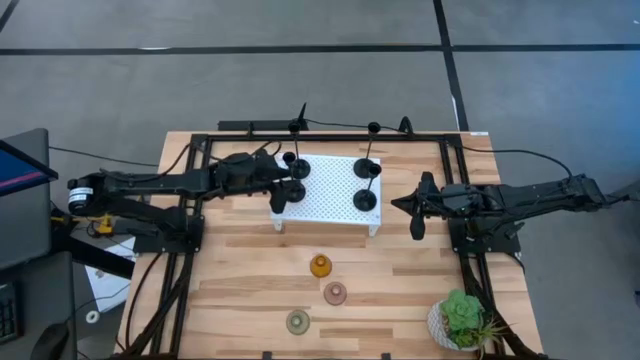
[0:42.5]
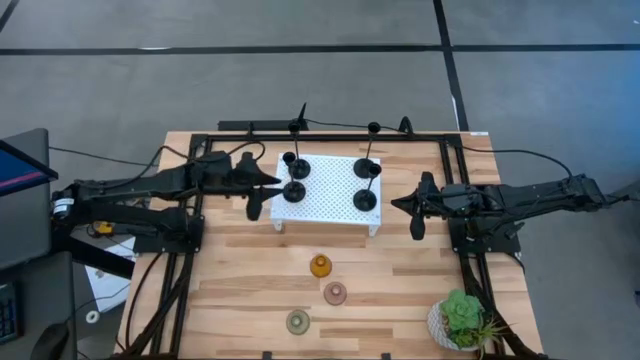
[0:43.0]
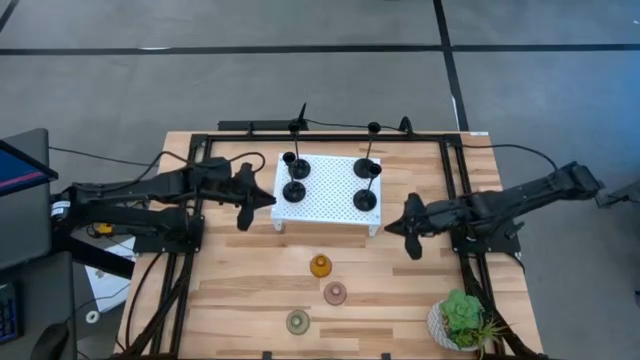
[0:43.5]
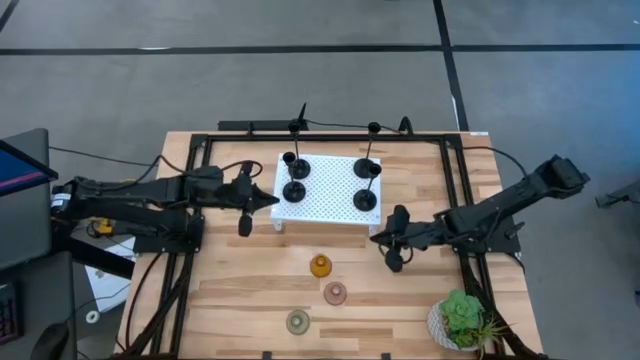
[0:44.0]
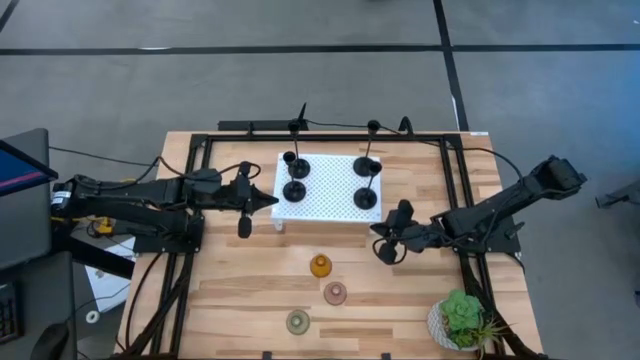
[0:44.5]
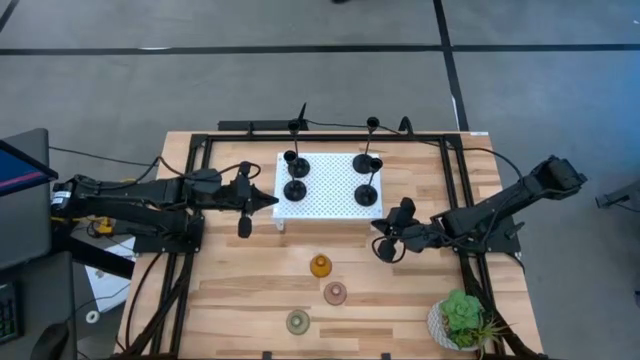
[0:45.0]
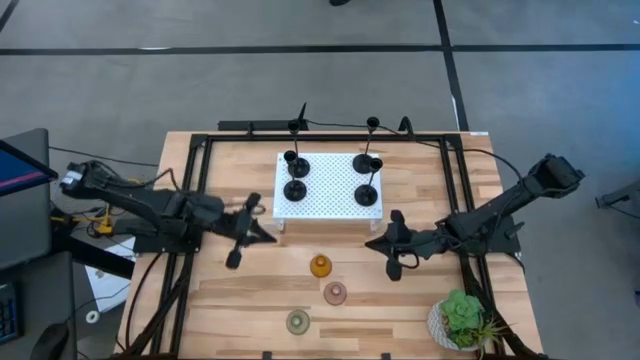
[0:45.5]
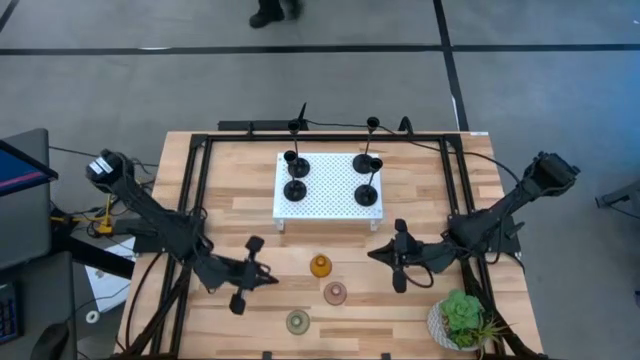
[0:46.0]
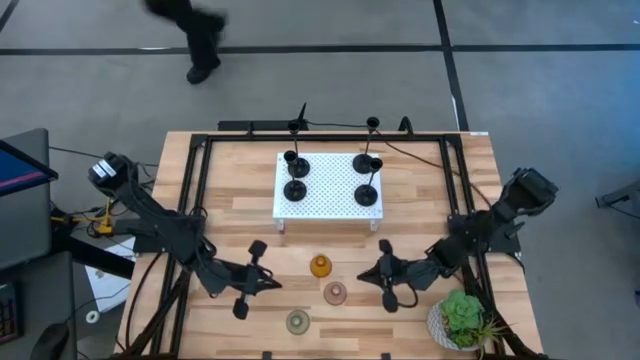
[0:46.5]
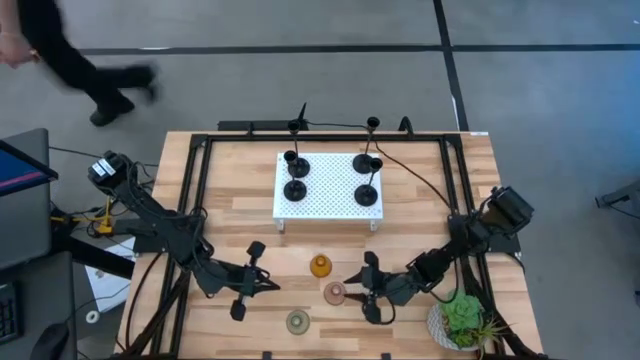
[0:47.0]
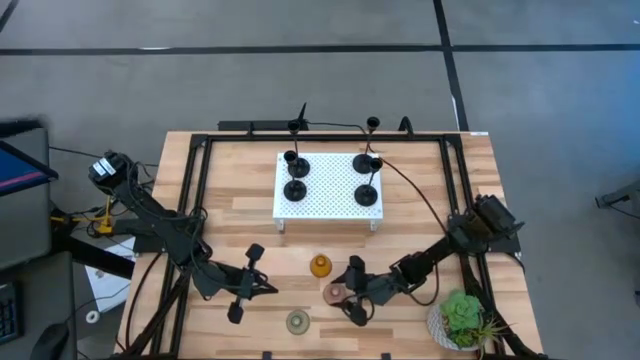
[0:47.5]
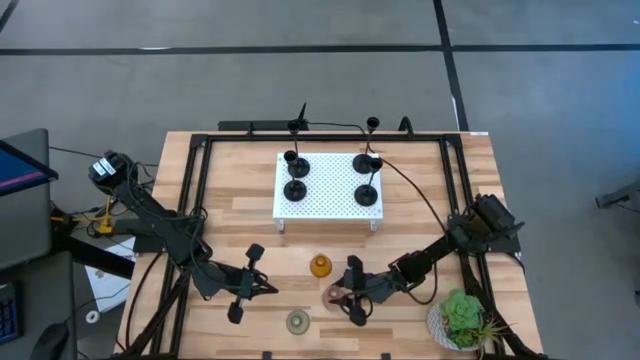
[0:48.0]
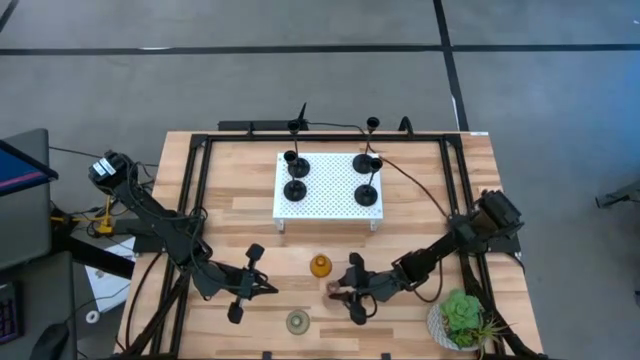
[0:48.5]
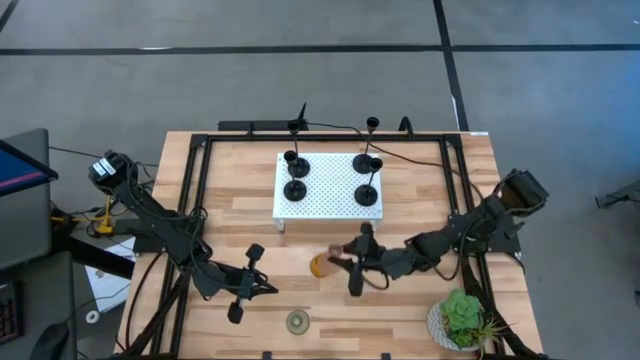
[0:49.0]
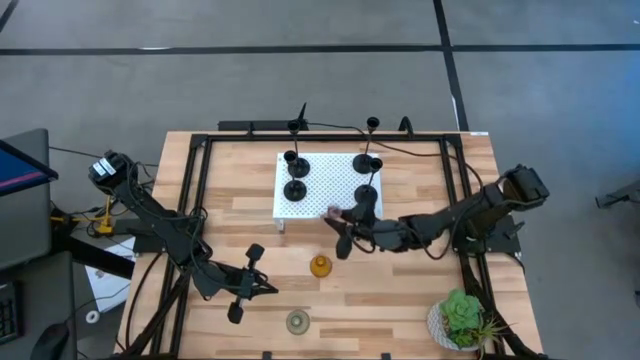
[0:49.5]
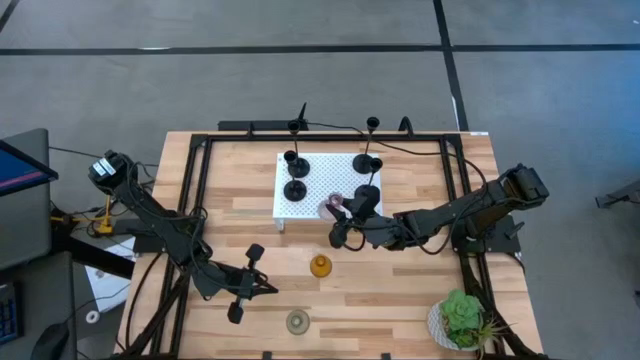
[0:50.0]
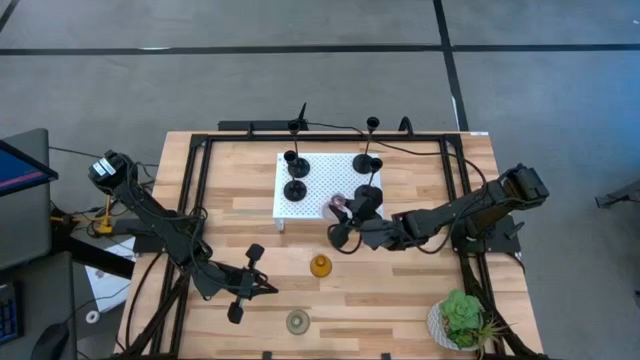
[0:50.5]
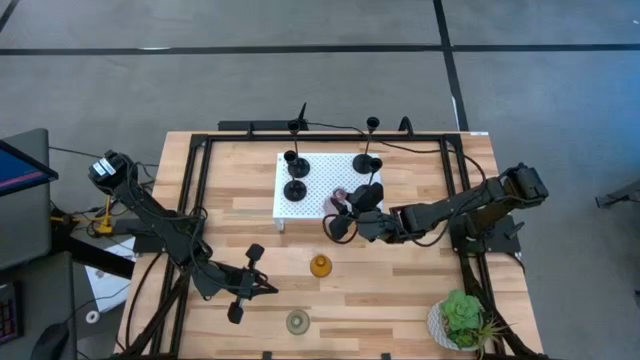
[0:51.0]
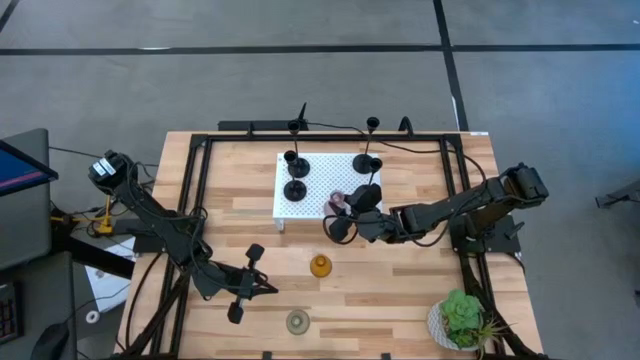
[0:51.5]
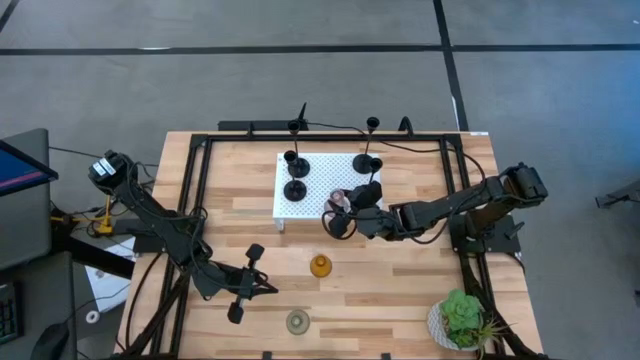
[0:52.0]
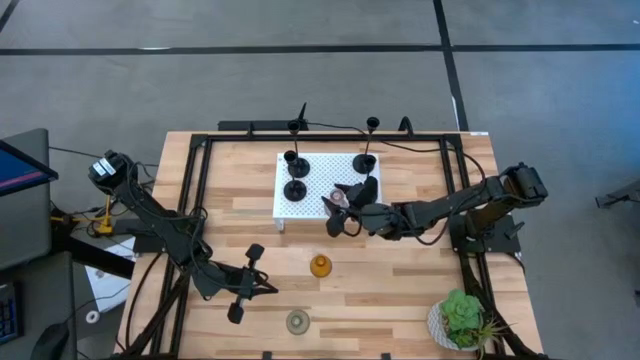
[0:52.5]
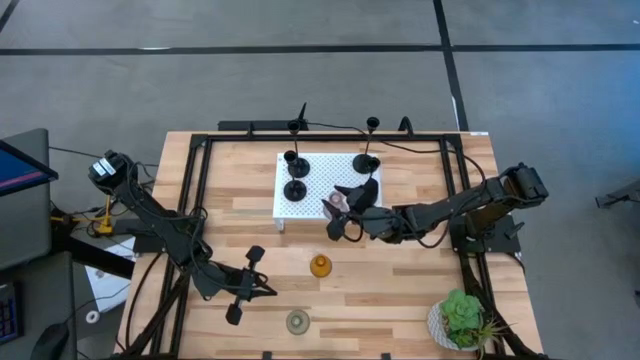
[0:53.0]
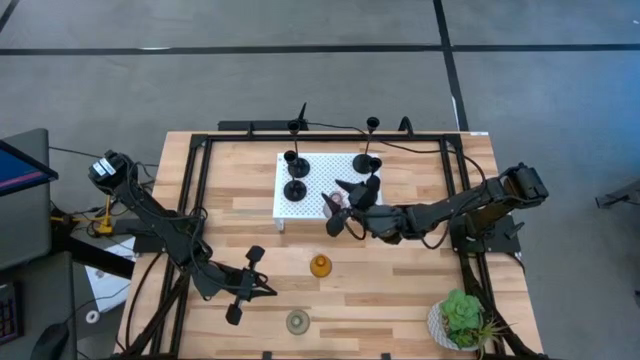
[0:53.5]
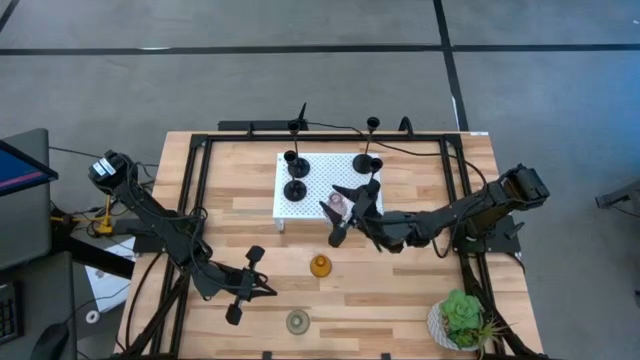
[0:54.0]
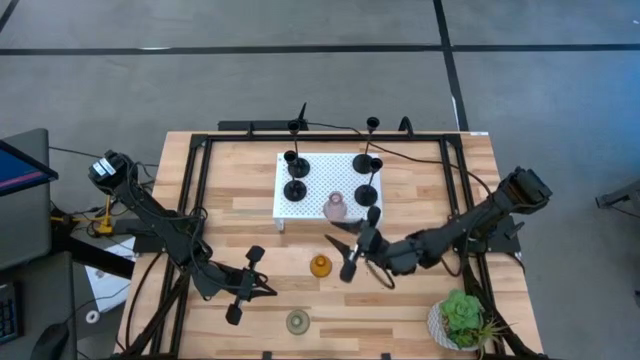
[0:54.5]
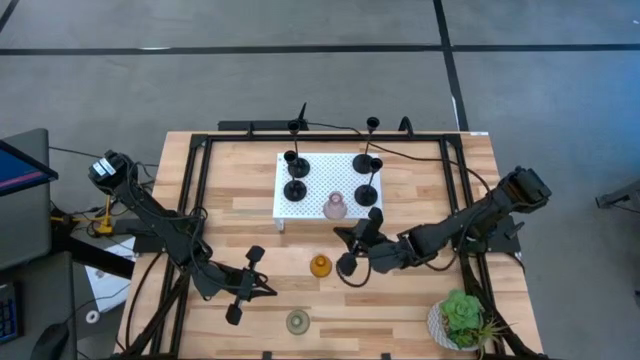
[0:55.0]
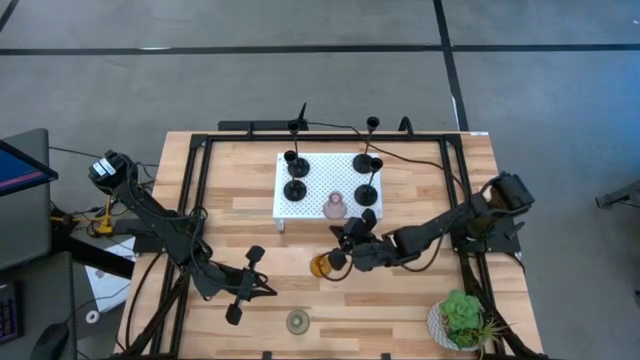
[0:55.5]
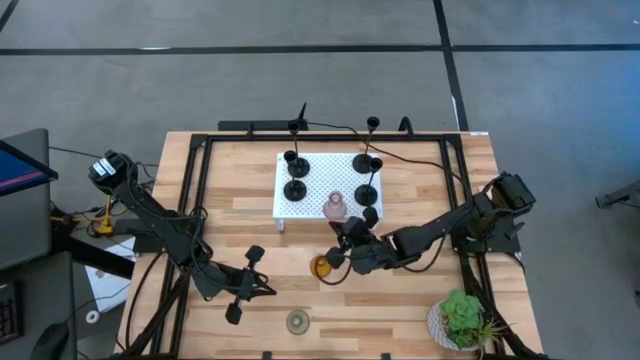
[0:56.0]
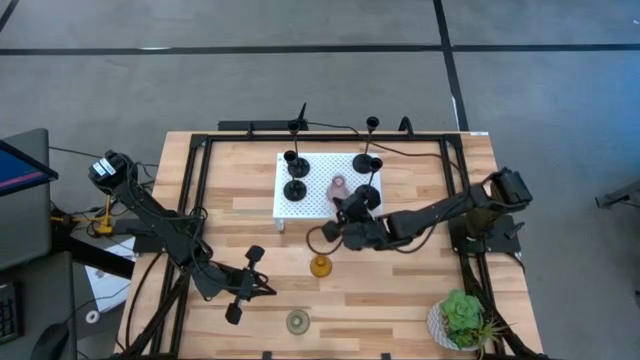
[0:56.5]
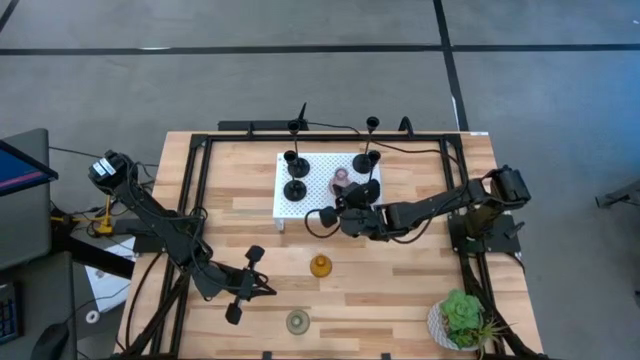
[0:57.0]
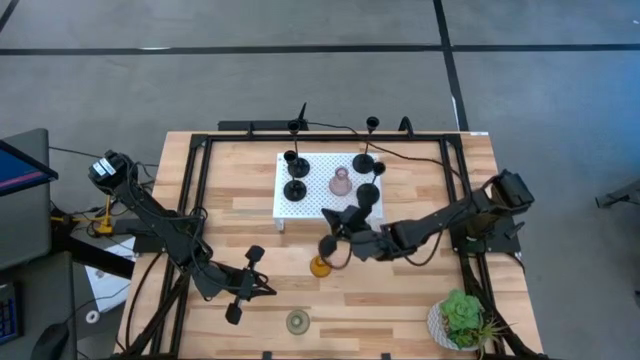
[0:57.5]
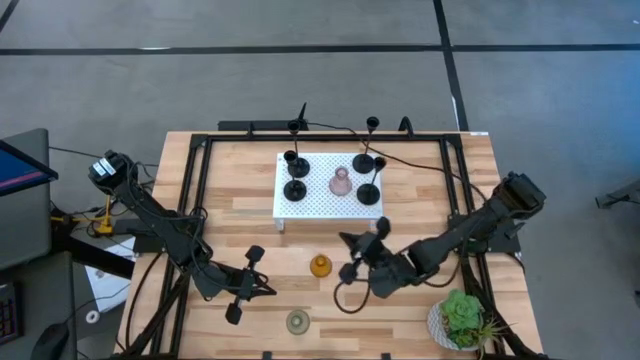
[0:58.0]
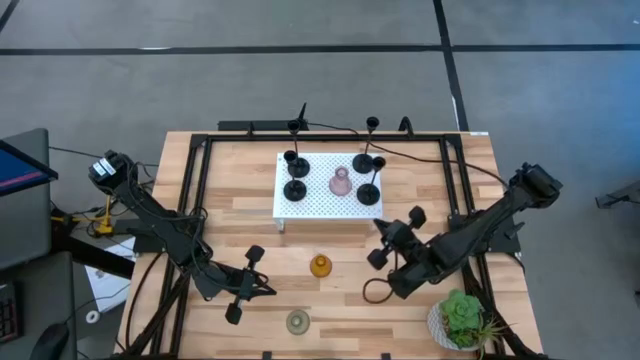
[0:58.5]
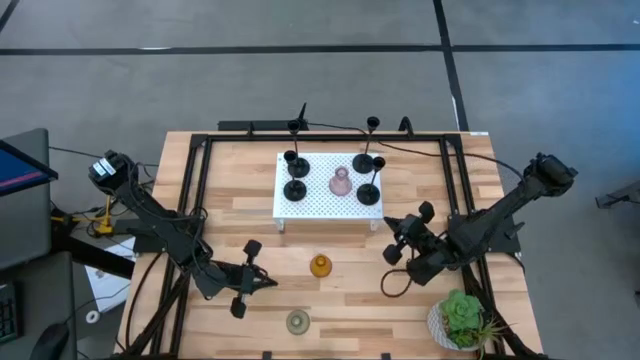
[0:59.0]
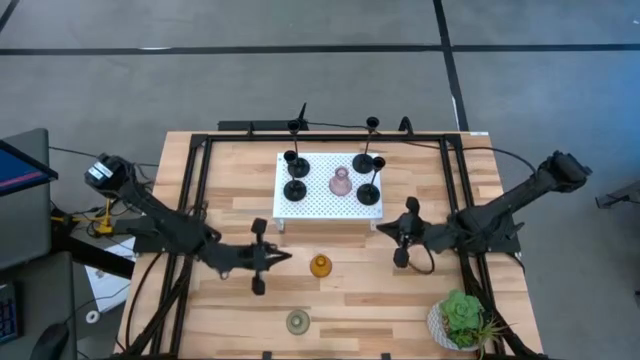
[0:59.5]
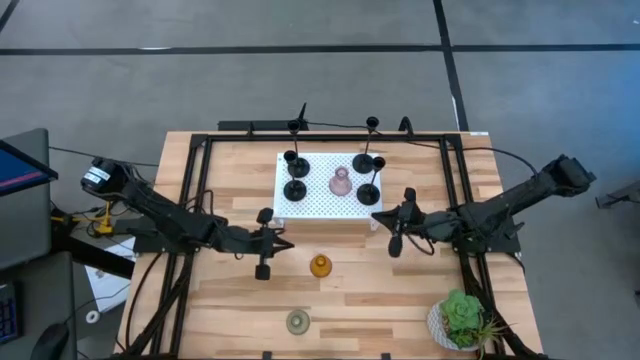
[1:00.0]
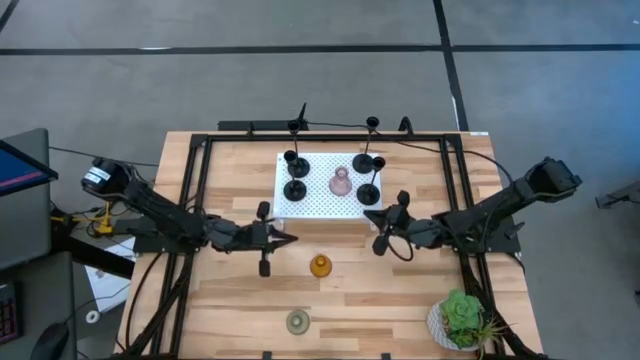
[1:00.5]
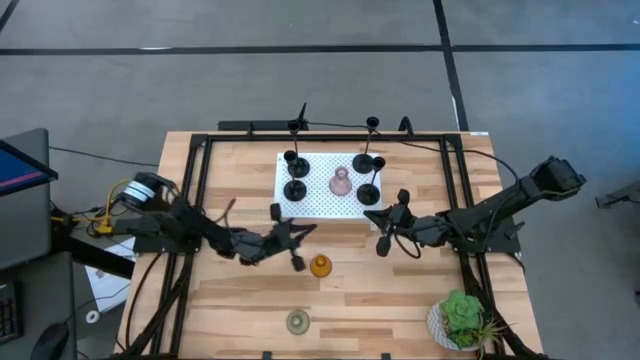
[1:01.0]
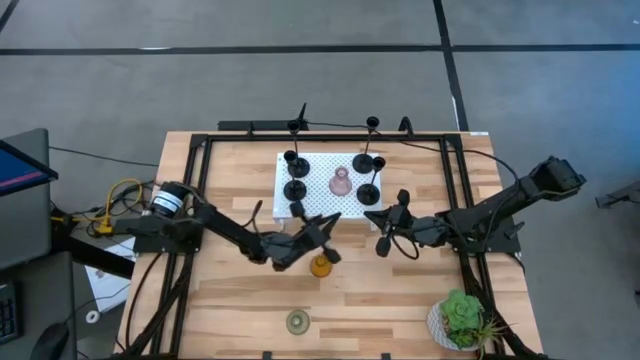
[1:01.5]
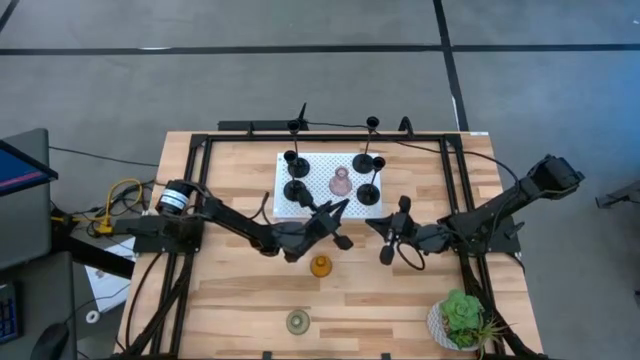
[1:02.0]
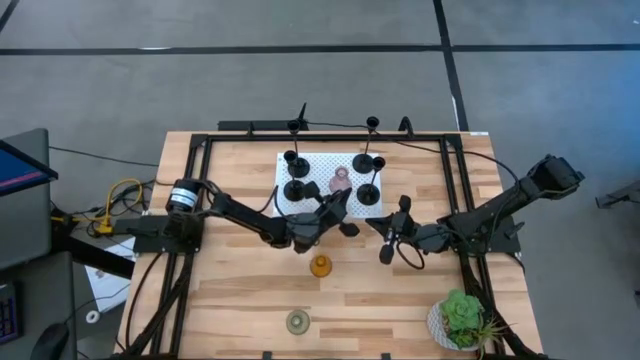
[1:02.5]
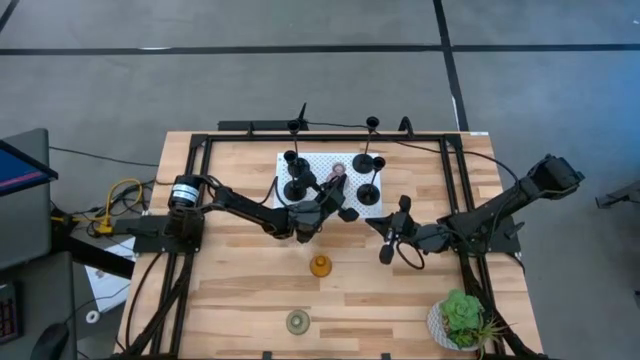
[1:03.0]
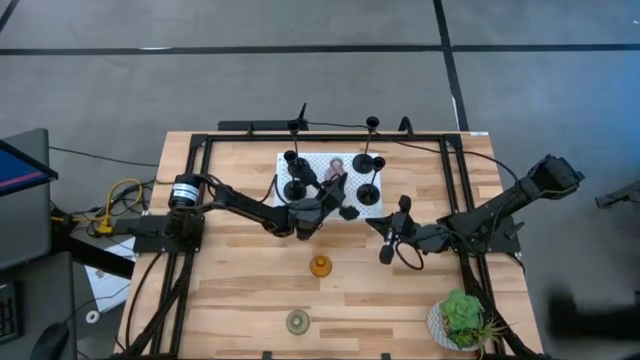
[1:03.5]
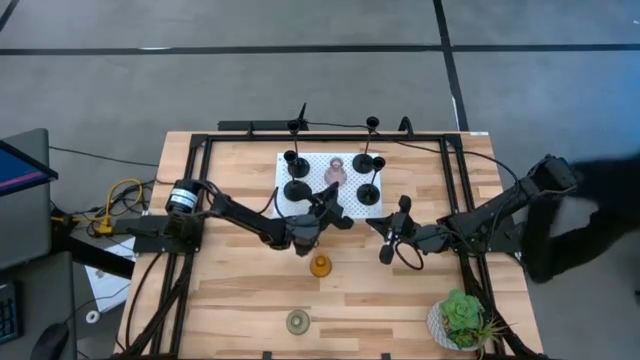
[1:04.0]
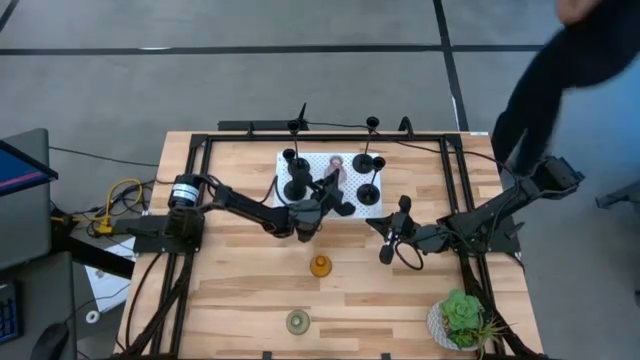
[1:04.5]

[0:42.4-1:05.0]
Task: Pick & Place candle stick holders
Put the purple candle holder on the shelf
